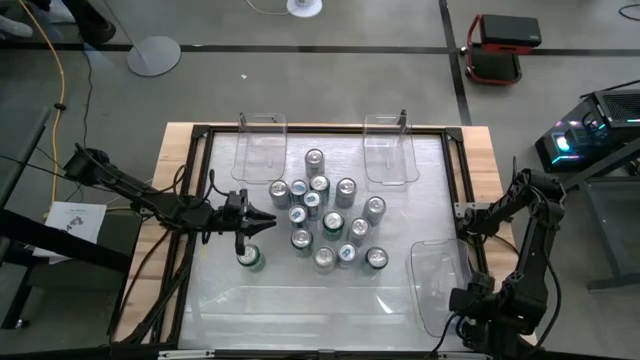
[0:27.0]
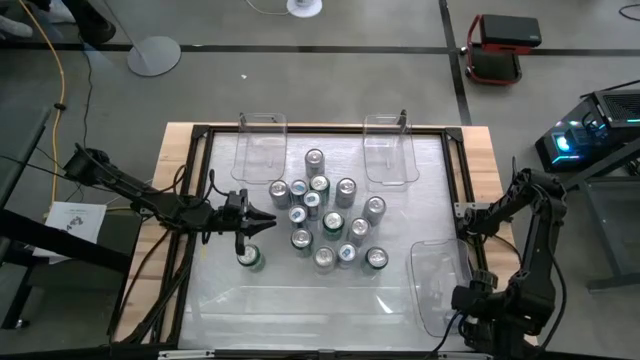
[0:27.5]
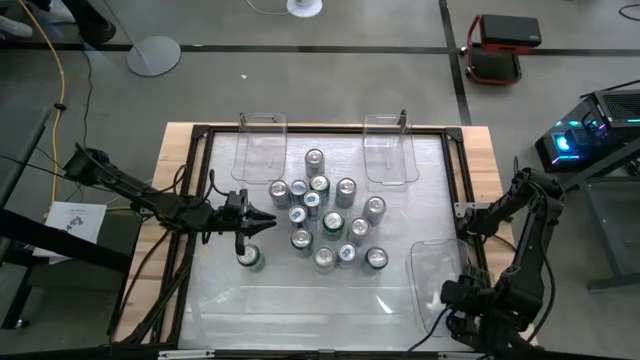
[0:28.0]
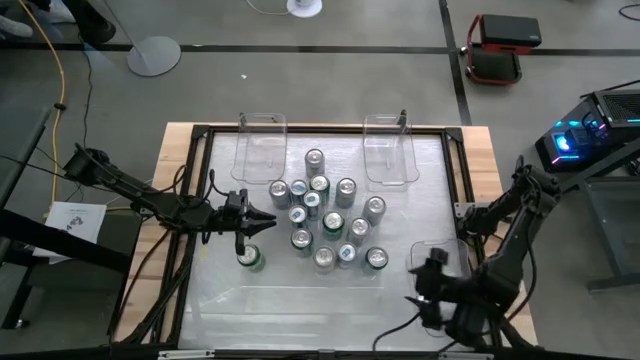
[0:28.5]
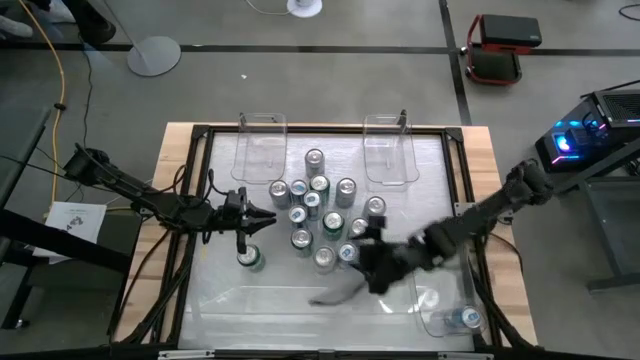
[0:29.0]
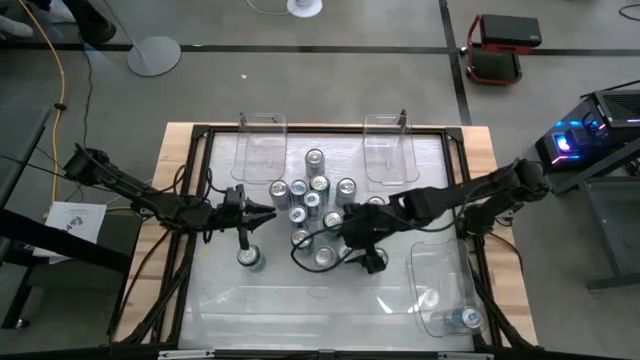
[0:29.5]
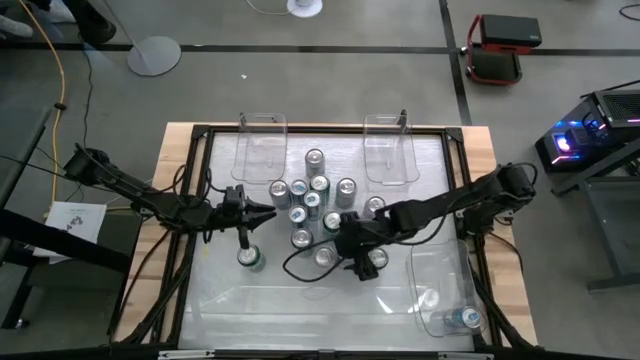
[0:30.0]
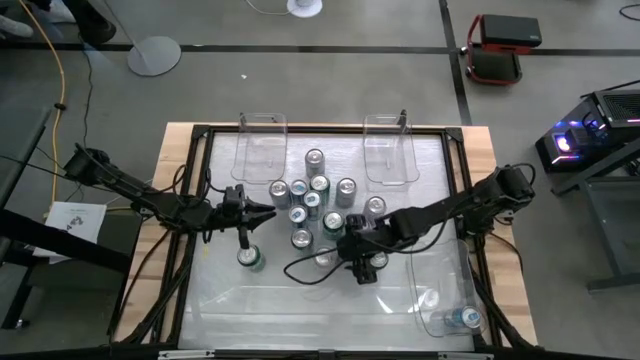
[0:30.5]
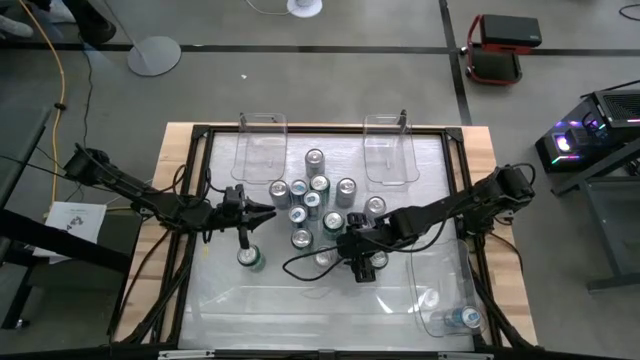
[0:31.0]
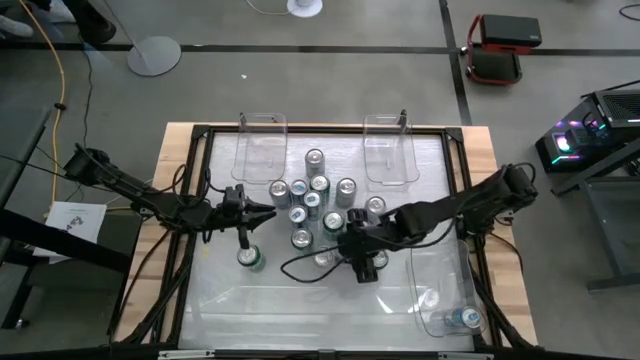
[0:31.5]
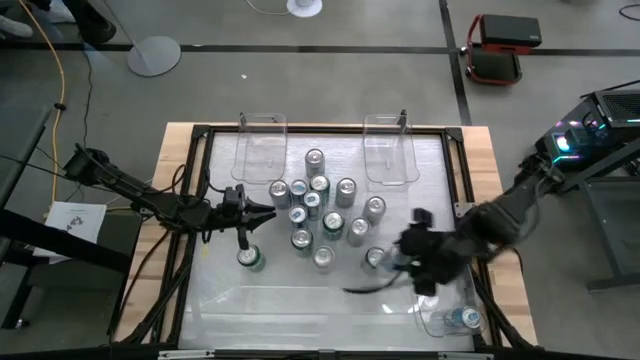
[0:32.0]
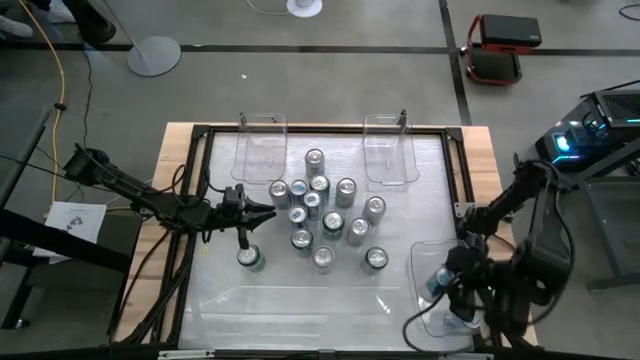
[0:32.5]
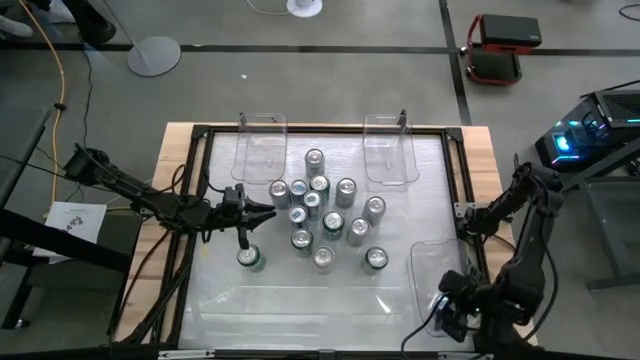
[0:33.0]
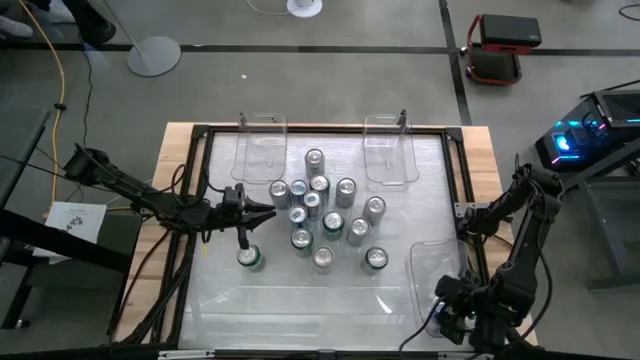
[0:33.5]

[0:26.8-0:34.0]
Task: Sort soda cans
Put the blue soda can into the bottom right transparent bin

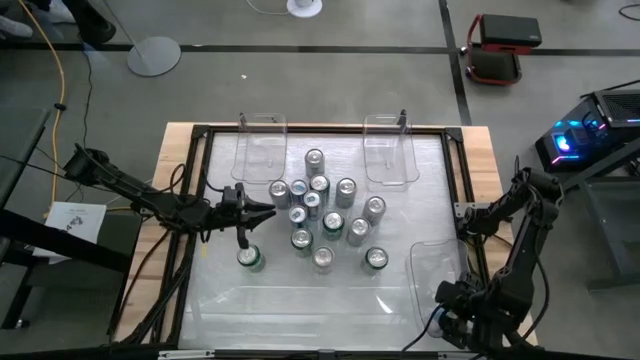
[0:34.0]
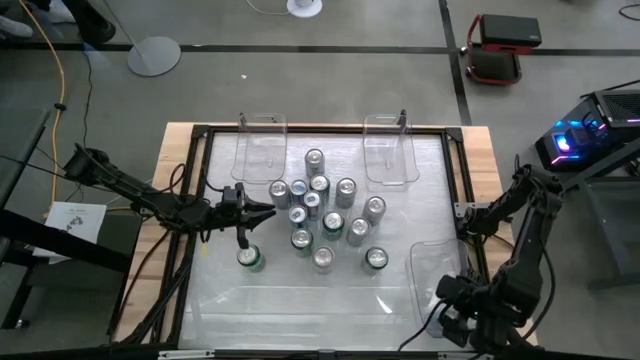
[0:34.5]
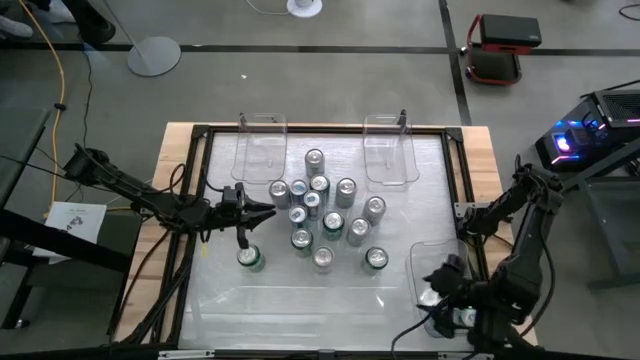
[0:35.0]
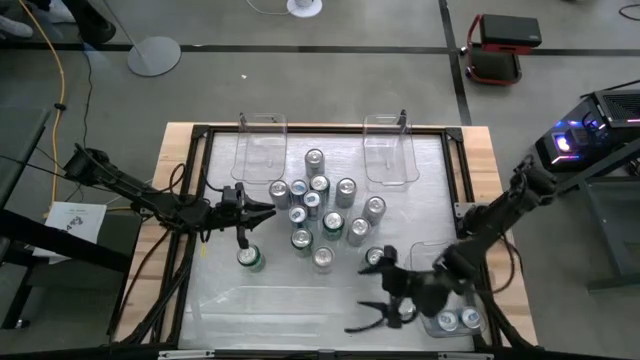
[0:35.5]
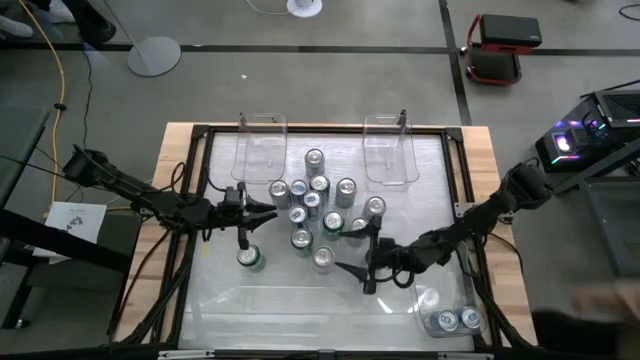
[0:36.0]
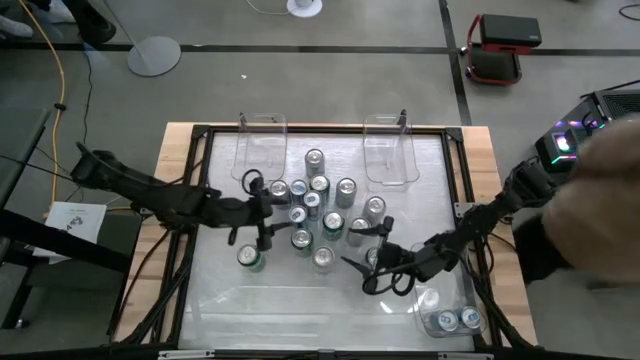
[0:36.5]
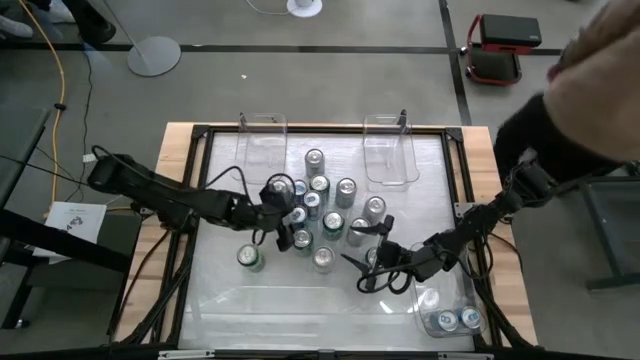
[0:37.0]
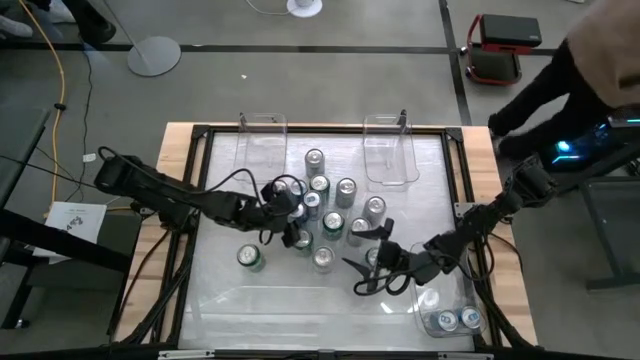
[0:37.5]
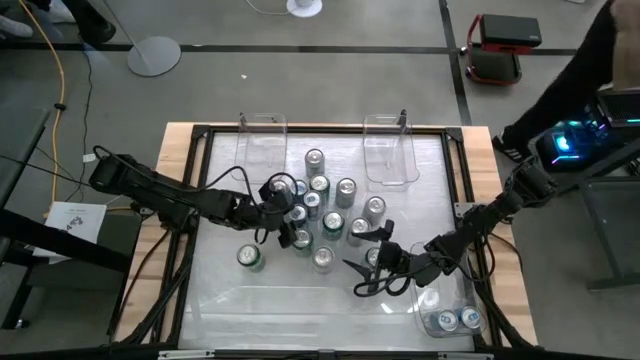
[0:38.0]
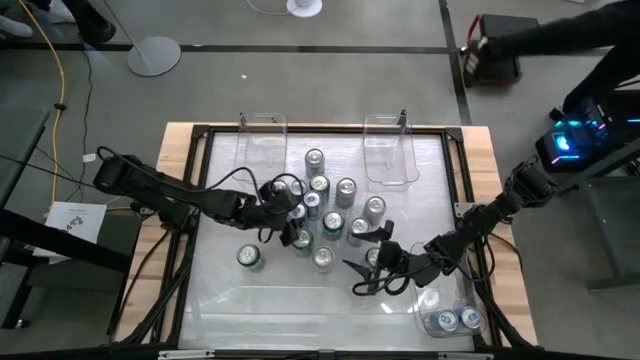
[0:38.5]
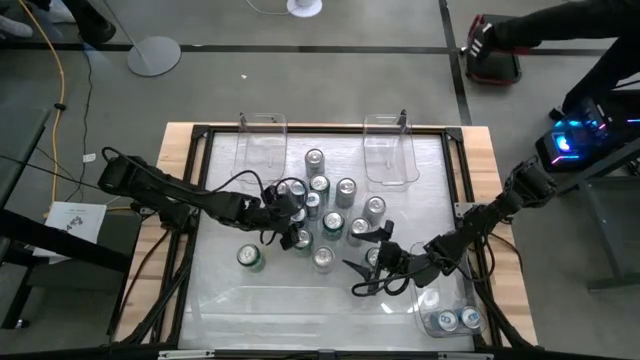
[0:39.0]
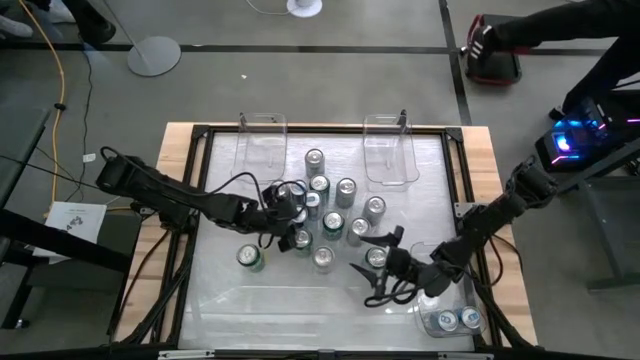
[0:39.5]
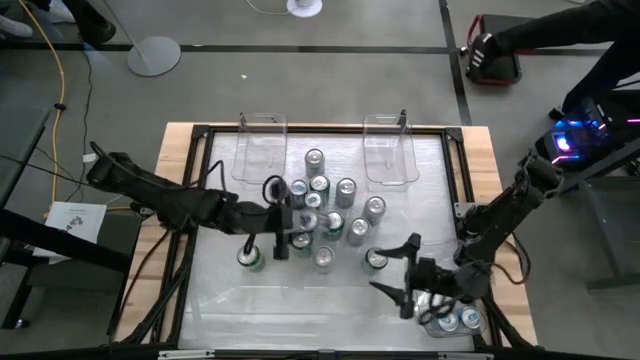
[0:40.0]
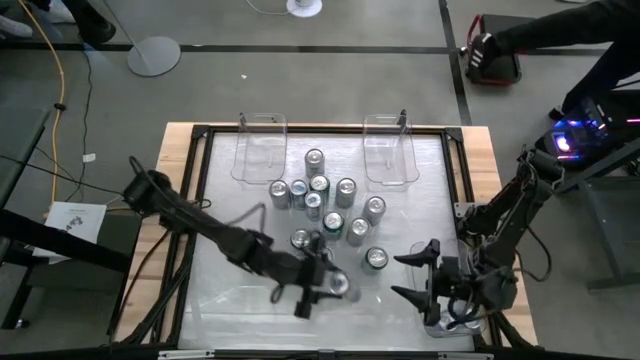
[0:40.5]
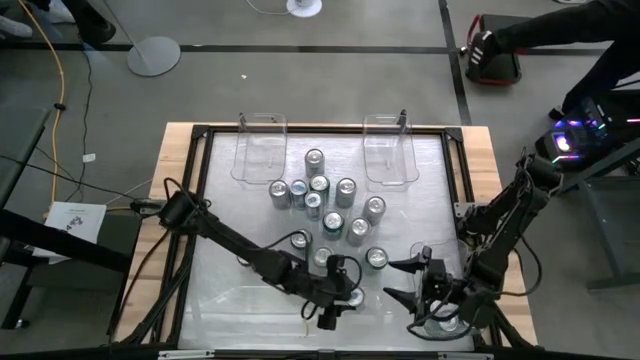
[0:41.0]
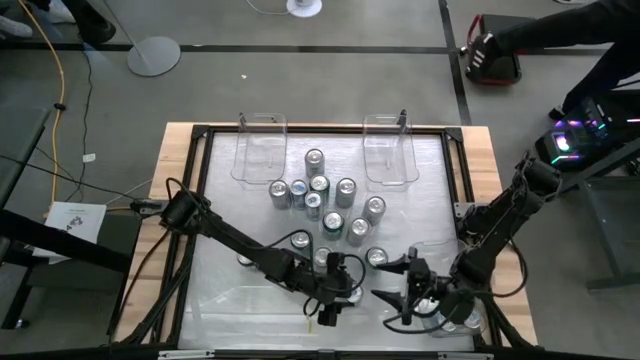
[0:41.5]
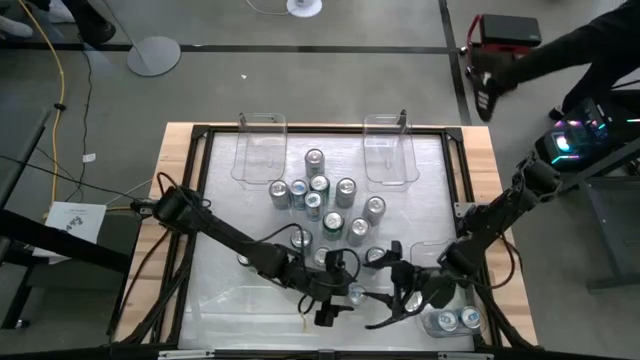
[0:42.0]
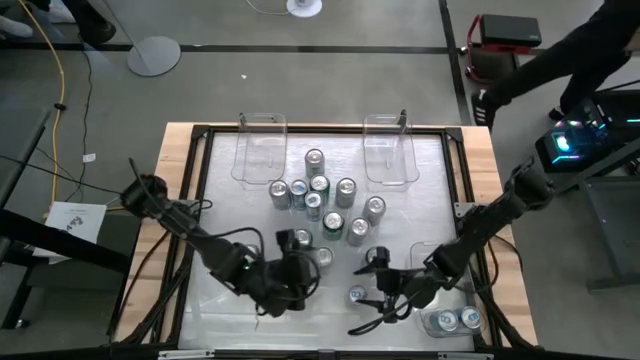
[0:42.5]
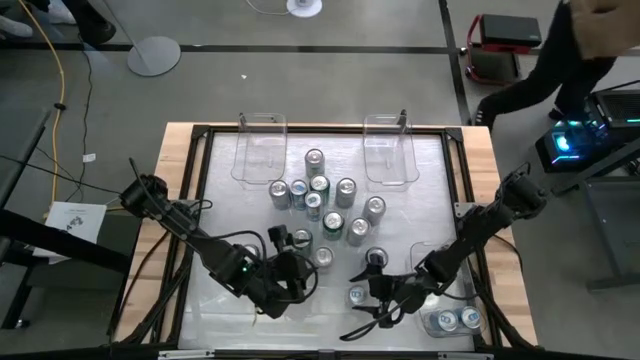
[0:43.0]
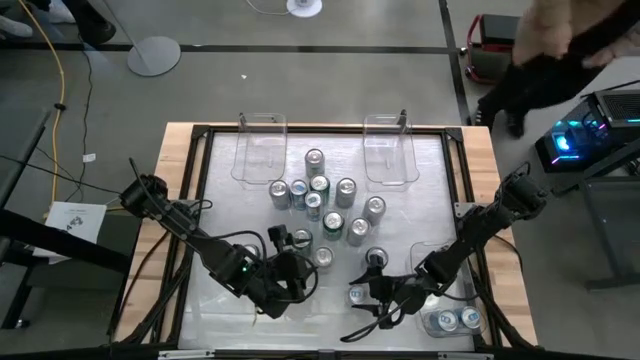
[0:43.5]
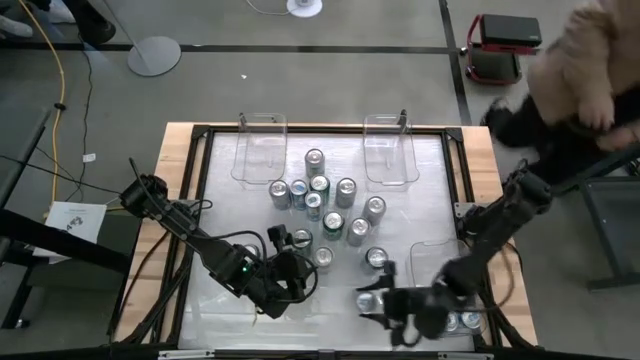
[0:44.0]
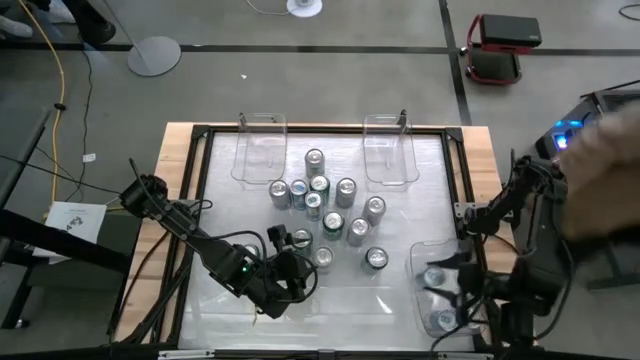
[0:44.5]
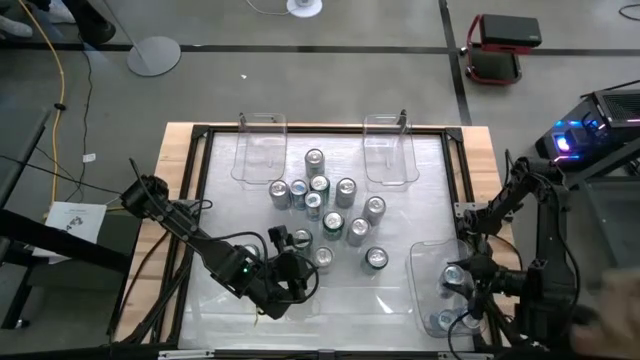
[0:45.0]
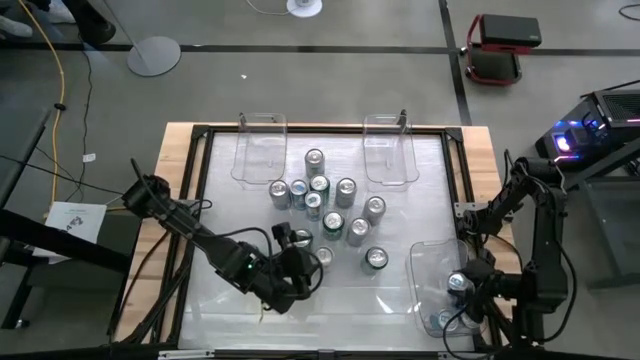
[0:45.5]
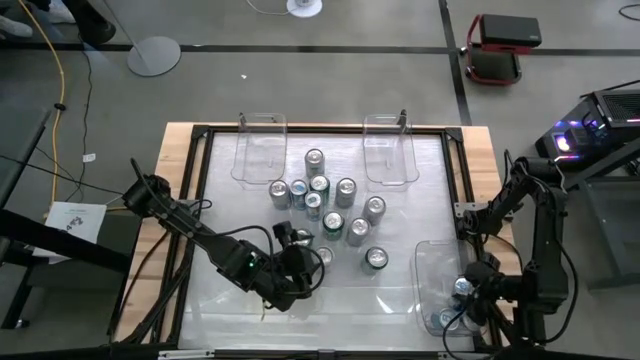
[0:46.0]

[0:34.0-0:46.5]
Put the blue soda can into the bottom right transparent bin
